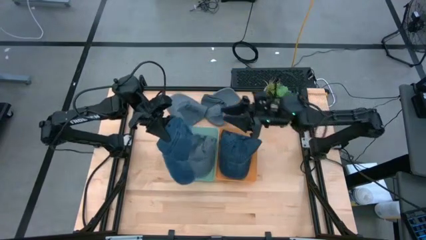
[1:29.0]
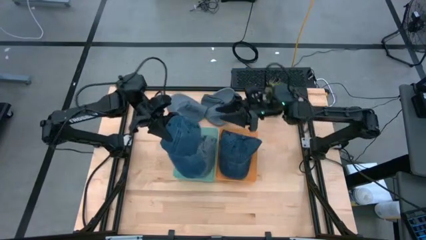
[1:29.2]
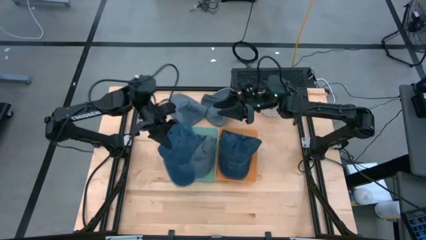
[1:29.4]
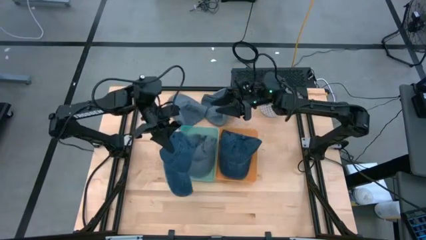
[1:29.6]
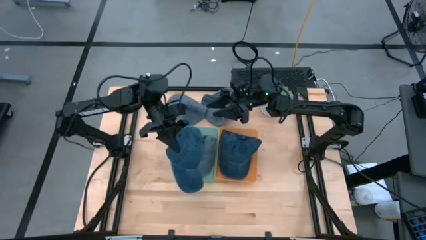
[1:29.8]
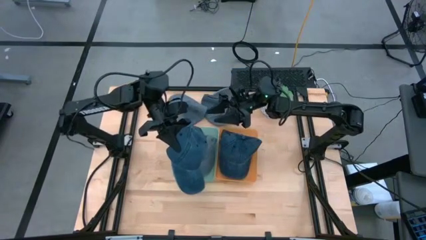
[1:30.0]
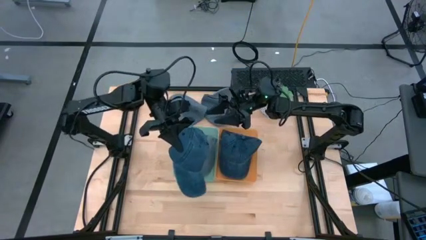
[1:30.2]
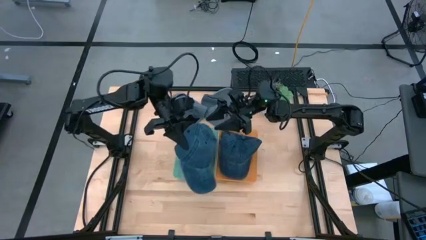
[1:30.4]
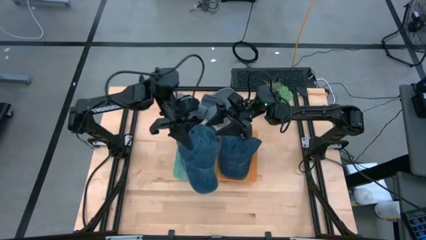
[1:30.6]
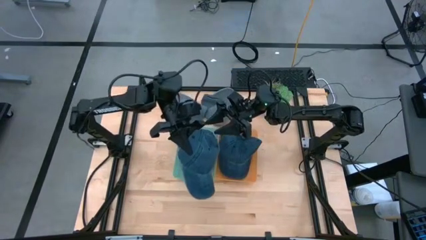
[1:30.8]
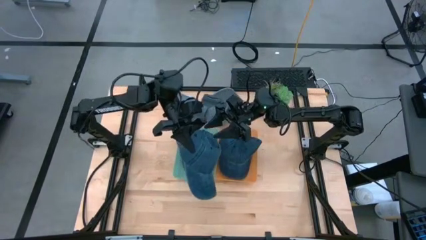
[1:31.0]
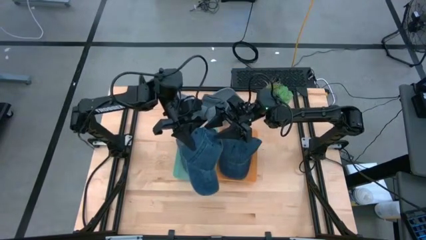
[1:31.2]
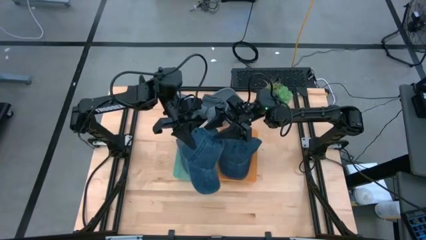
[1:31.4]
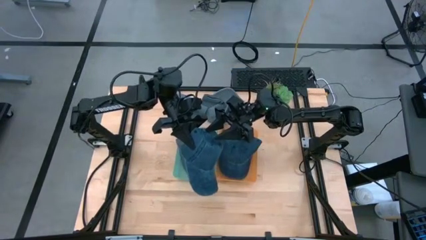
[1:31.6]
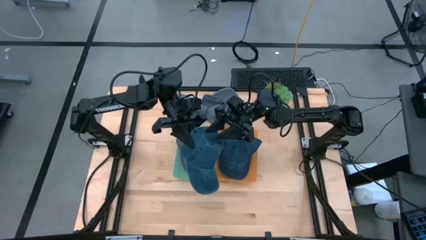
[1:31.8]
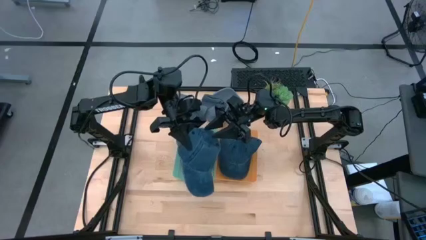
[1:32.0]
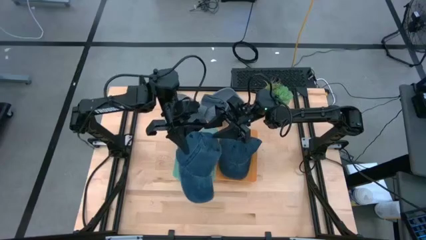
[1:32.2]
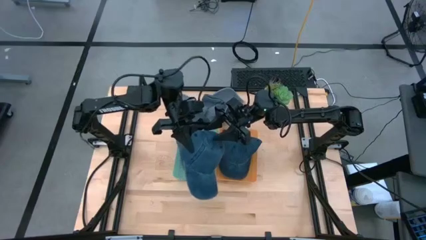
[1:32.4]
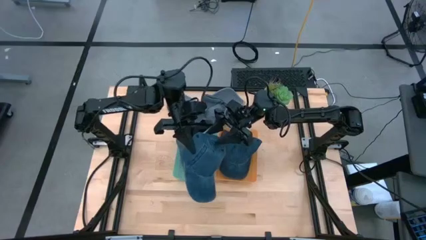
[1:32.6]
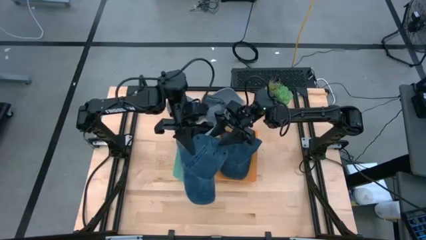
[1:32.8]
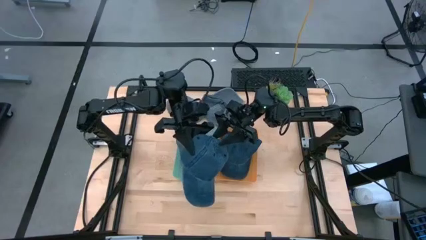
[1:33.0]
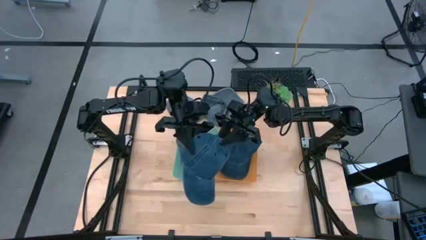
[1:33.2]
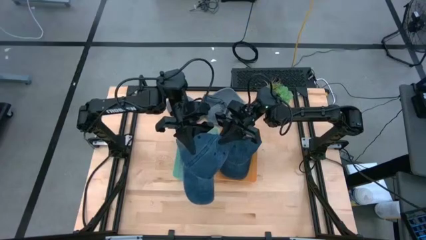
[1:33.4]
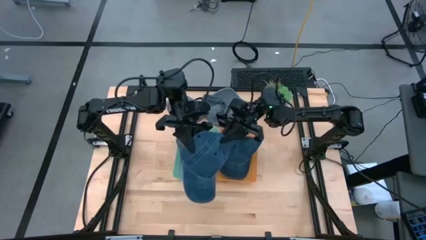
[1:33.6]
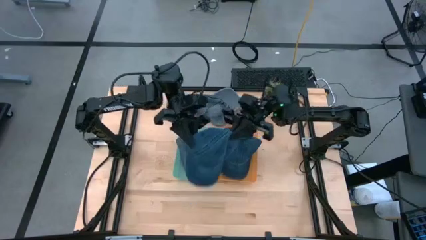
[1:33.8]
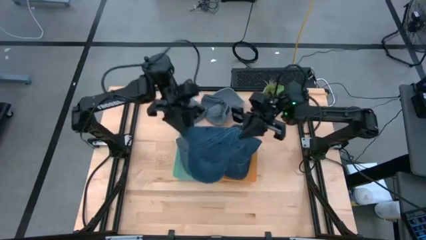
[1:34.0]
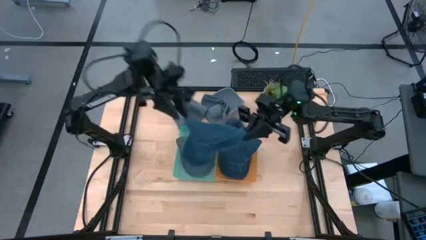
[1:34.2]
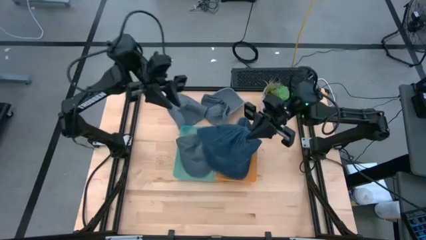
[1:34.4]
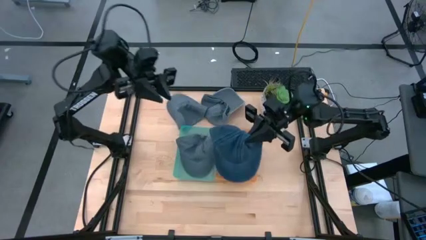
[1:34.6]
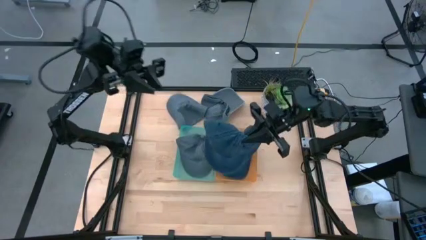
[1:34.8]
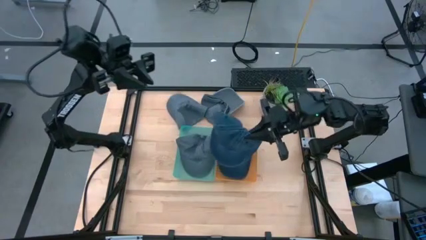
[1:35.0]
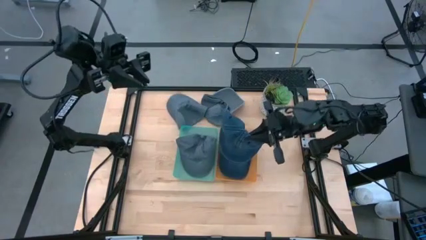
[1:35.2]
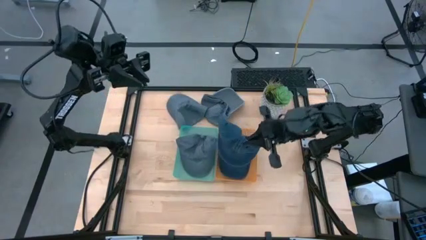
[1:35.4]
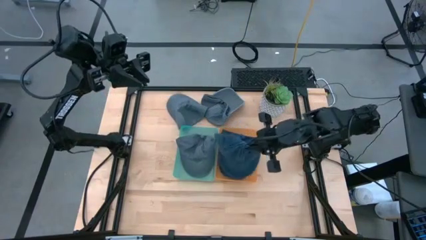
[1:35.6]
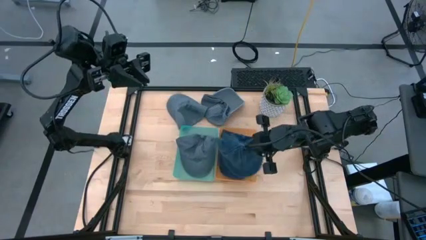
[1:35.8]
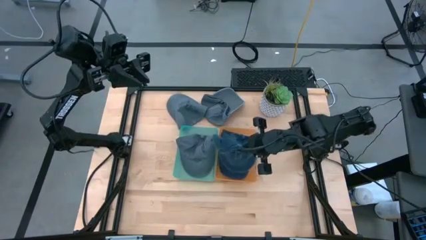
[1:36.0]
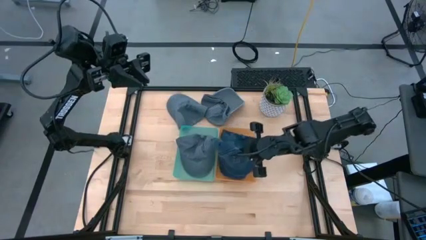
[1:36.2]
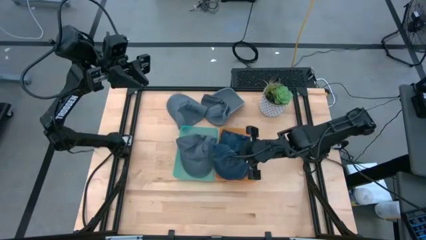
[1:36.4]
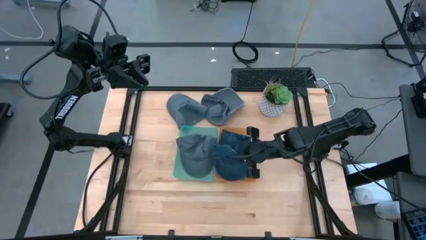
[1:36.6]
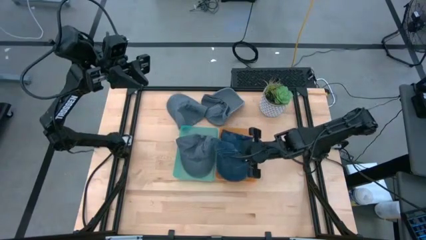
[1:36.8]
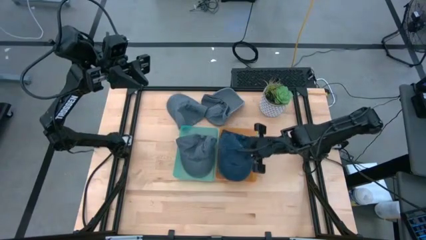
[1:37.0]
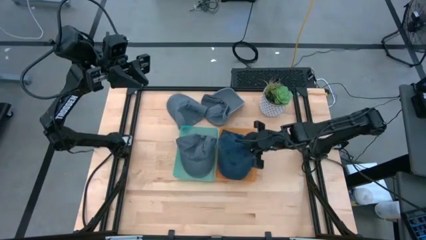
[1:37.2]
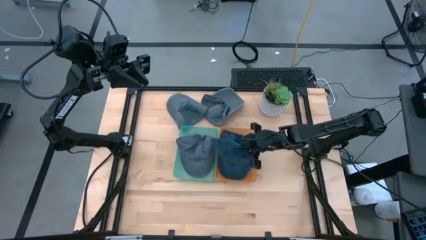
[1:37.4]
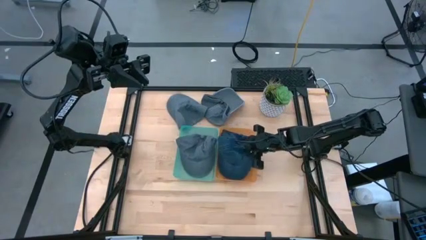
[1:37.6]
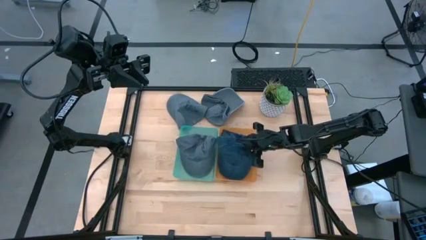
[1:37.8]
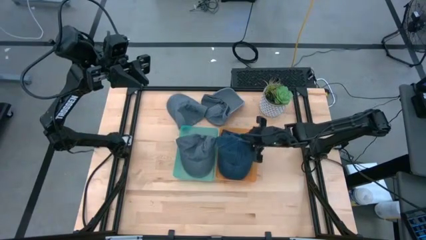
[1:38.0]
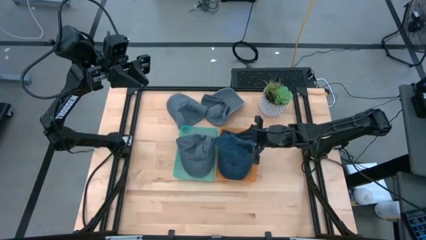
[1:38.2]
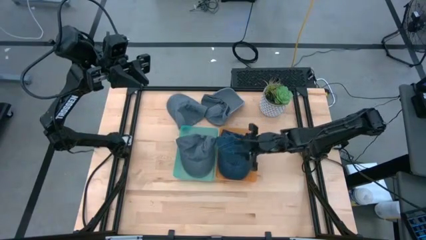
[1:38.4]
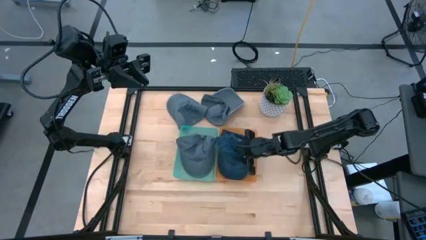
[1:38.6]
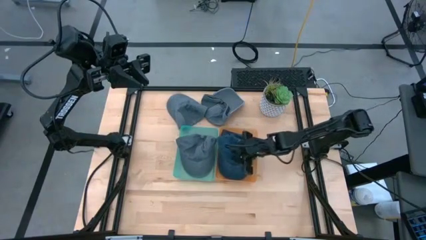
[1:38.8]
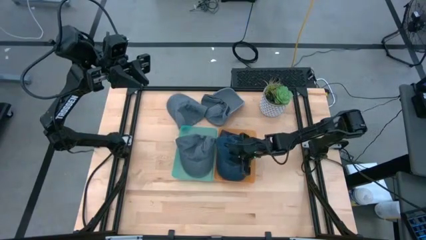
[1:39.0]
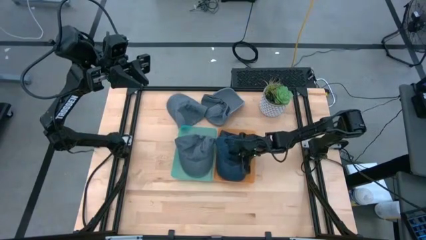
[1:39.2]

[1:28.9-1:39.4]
Task: Pick & Place hat
Put the blue cap into the orange bin

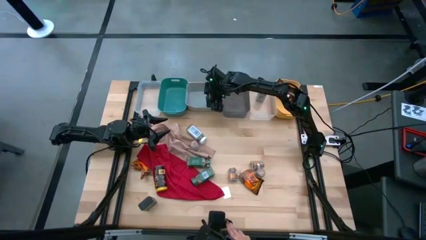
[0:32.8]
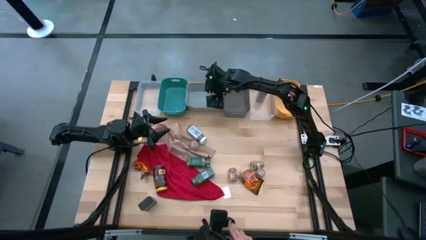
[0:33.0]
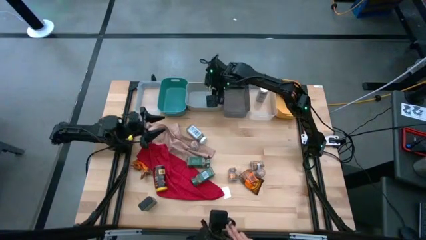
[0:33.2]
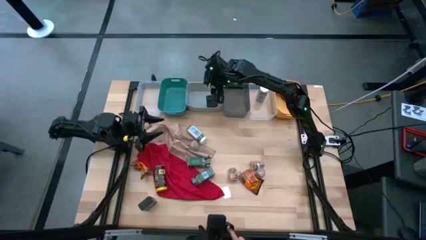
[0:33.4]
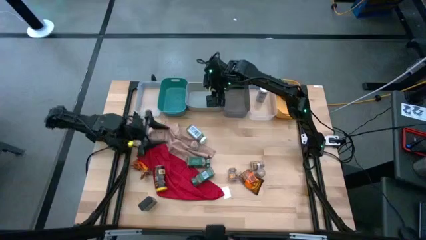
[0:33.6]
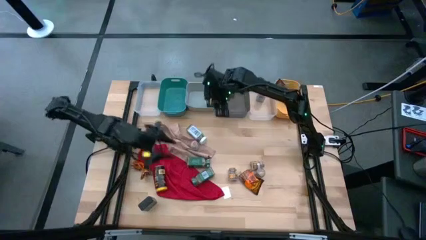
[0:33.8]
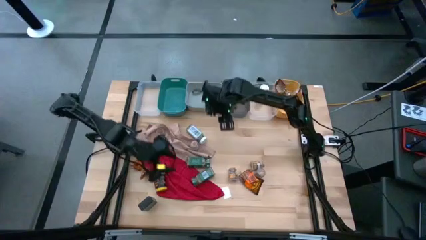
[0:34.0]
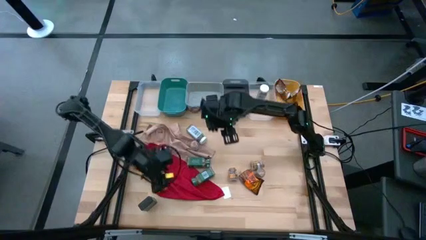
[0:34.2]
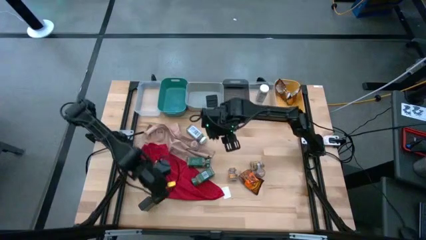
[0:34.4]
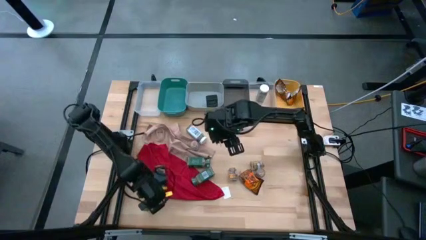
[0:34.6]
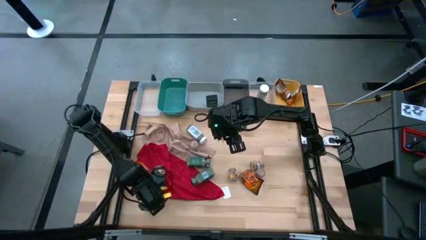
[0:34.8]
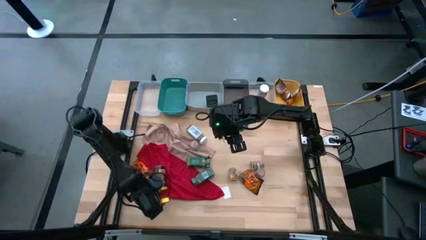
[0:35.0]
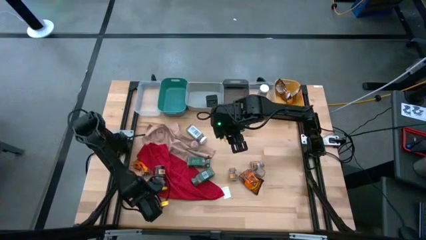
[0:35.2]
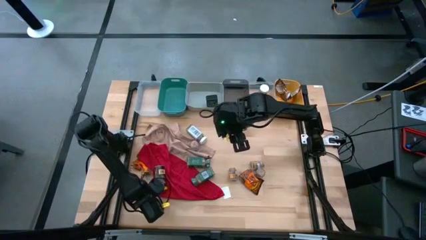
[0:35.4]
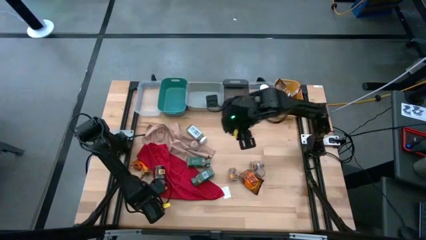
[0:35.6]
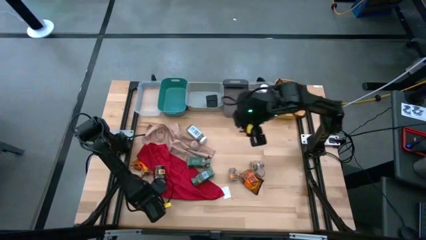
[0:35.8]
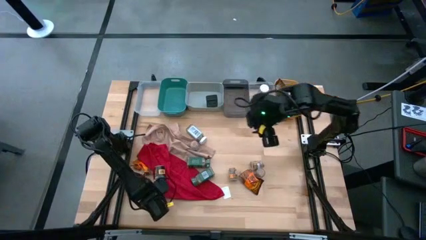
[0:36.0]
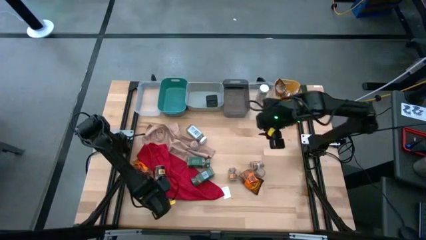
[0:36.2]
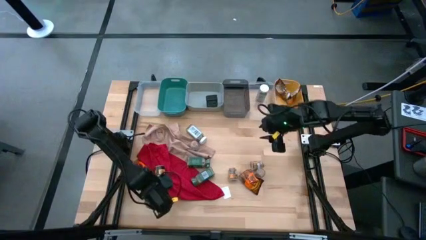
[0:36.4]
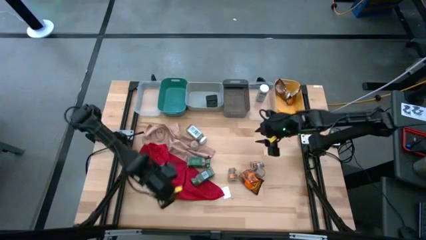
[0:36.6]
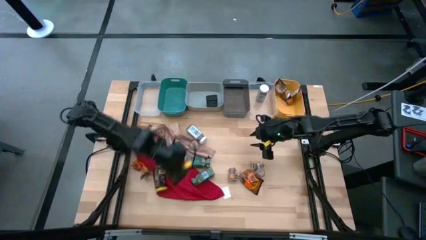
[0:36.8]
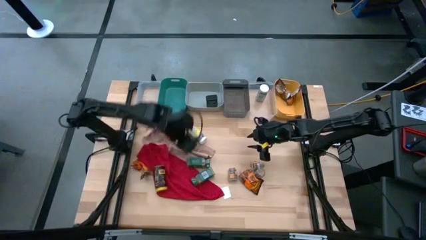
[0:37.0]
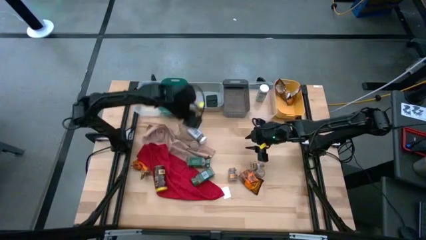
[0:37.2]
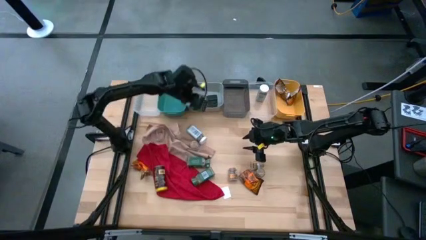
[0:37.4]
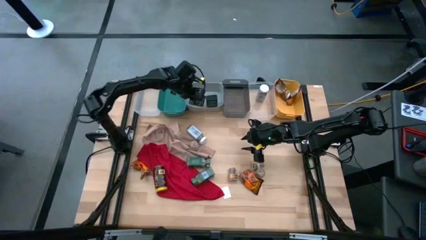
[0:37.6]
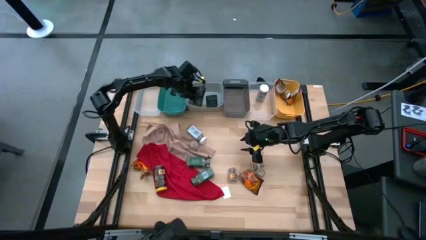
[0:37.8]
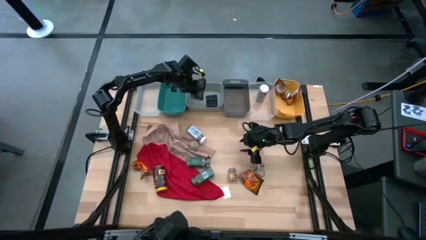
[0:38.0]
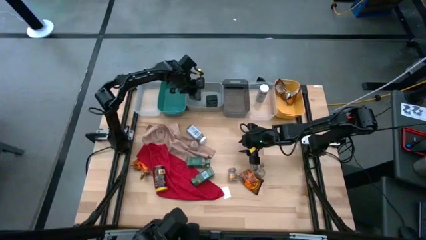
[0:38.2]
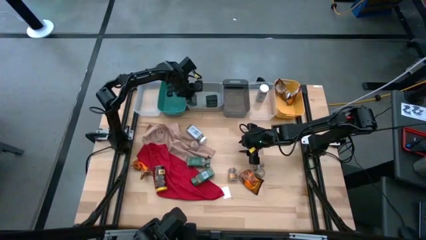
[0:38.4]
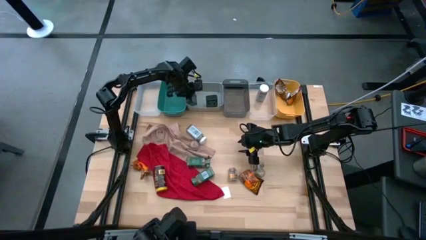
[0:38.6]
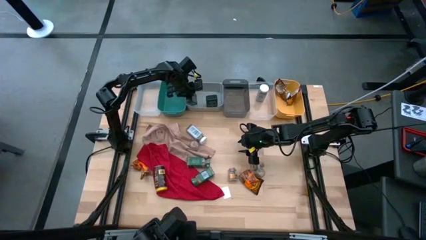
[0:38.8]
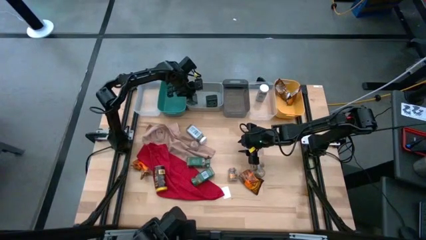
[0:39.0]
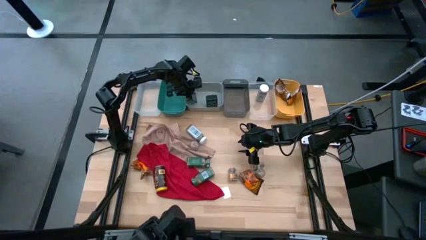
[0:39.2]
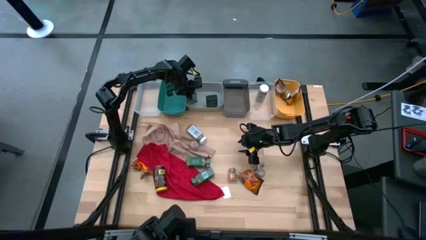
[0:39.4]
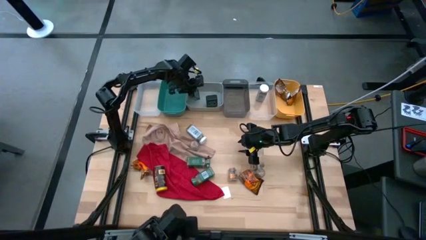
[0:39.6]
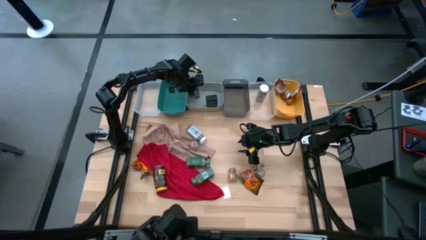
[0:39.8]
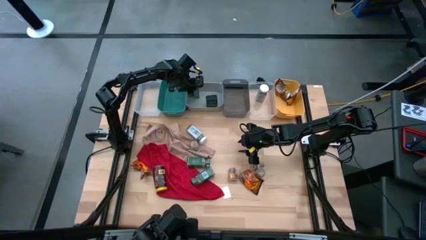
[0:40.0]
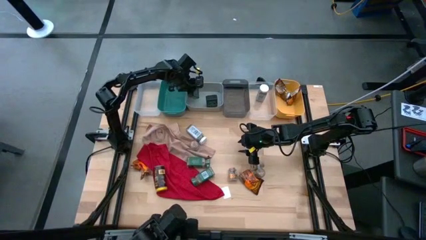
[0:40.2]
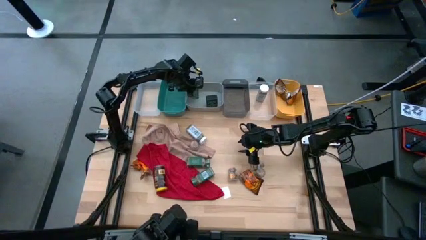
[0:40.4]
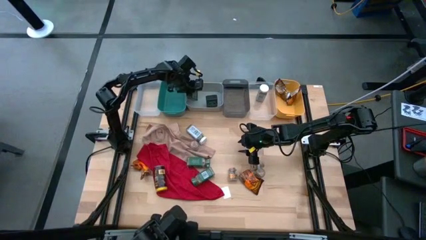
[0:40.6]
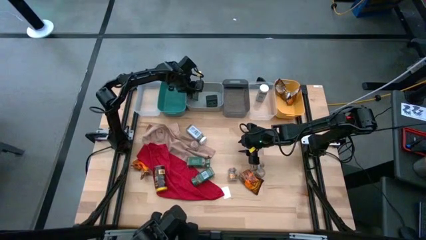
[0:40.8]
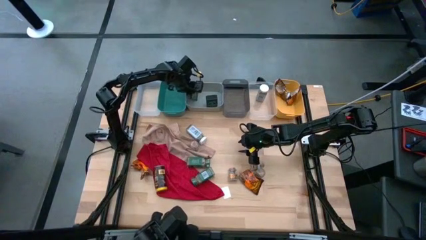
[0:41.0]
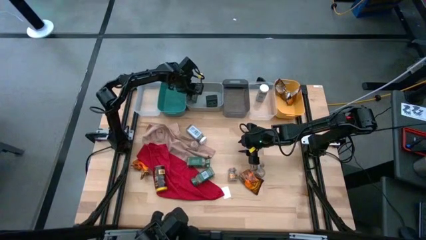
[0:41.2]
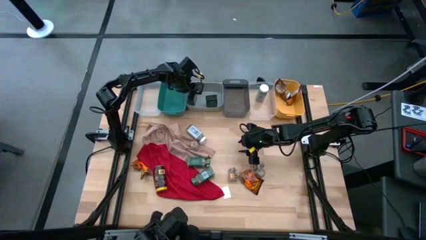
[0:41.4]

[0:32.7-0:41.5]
Task: Sort spices by type
Put the black seasoning can into the gray bin
